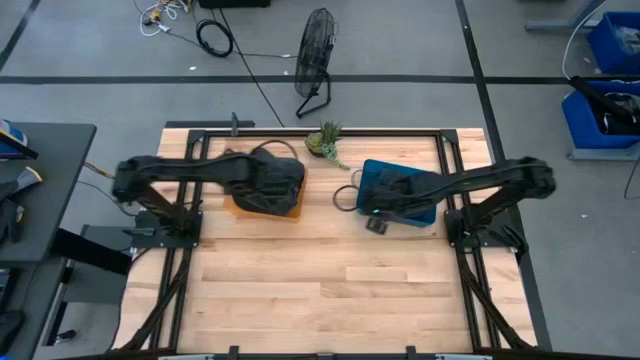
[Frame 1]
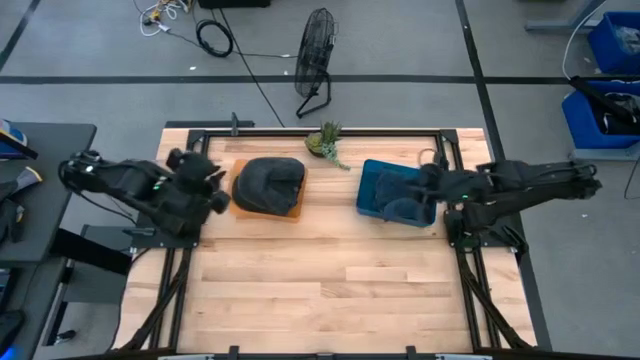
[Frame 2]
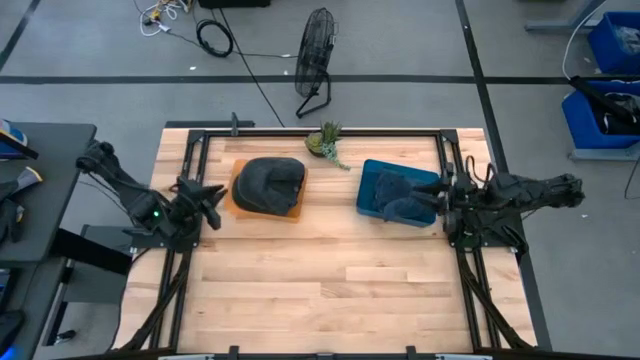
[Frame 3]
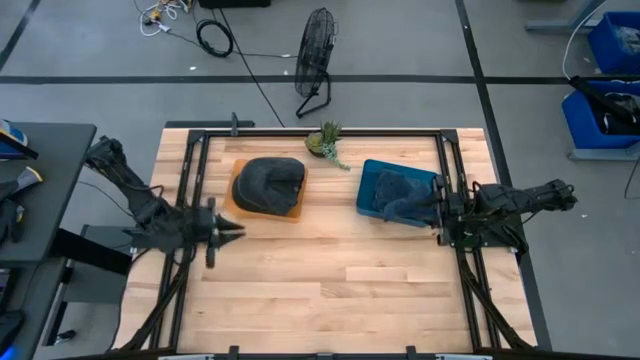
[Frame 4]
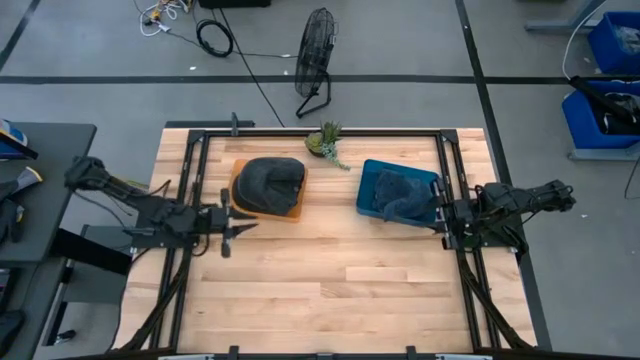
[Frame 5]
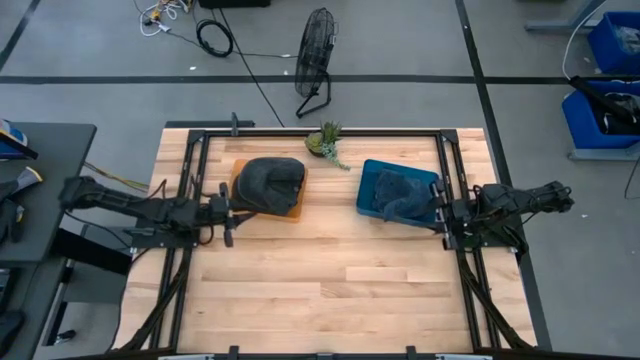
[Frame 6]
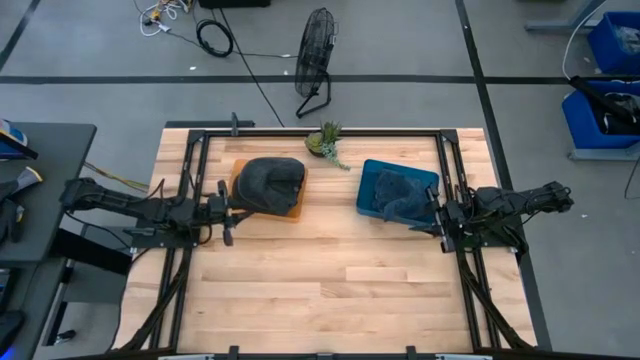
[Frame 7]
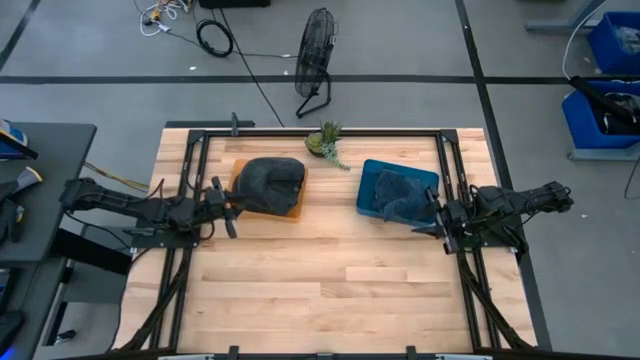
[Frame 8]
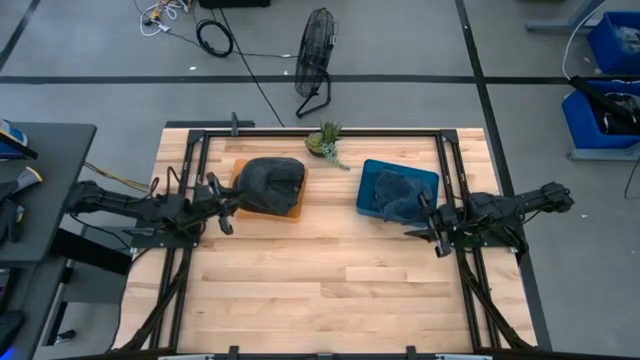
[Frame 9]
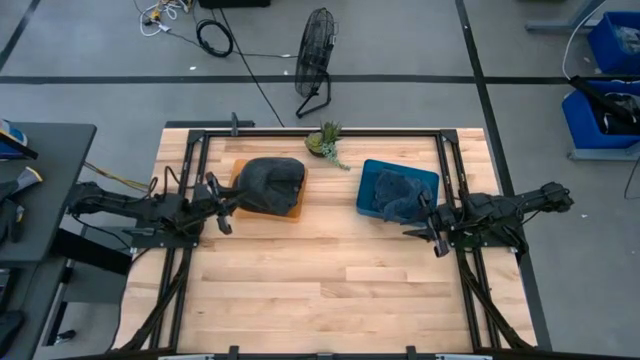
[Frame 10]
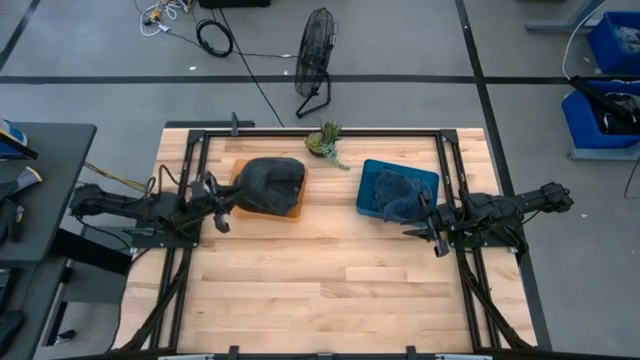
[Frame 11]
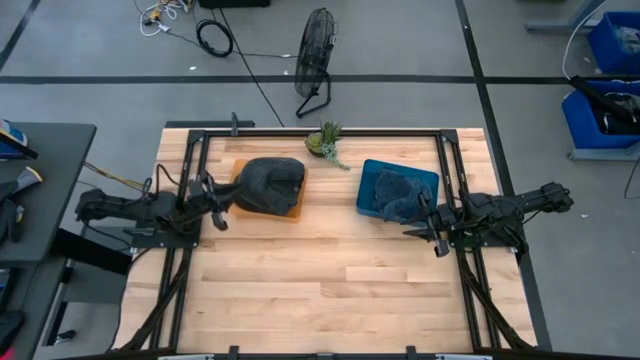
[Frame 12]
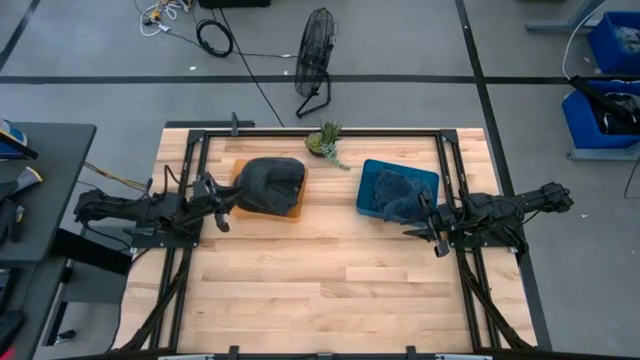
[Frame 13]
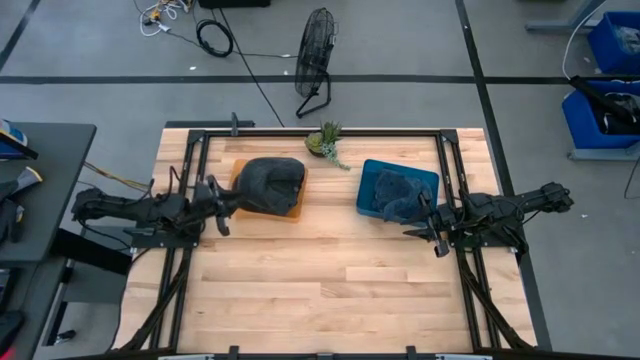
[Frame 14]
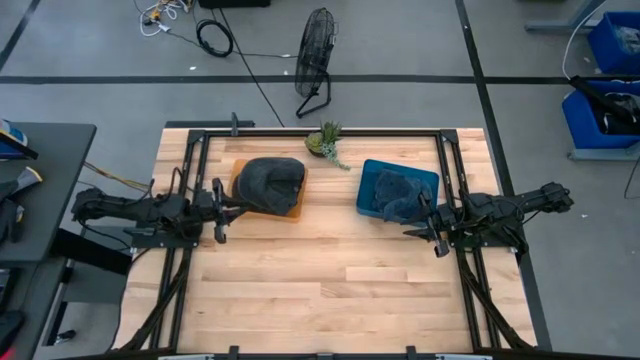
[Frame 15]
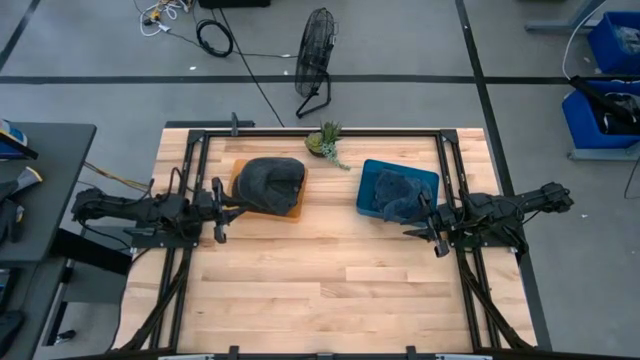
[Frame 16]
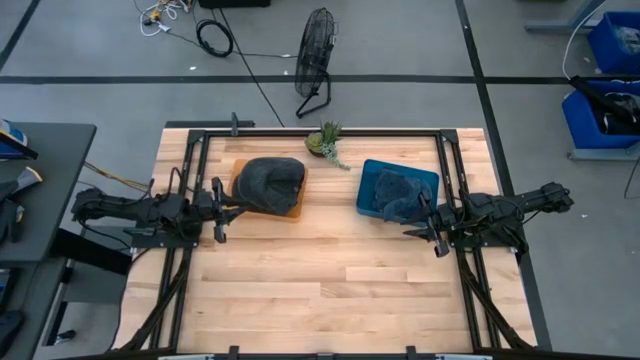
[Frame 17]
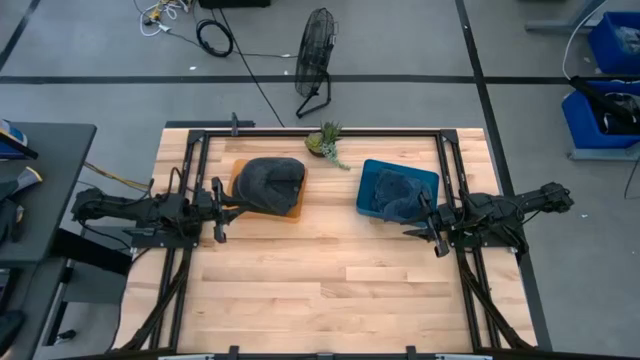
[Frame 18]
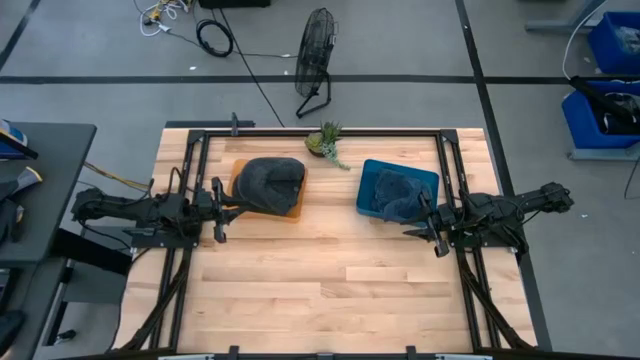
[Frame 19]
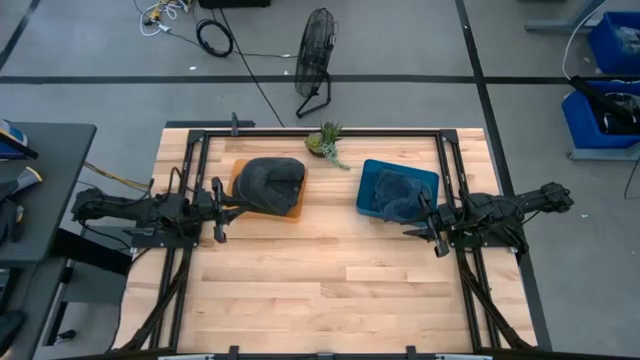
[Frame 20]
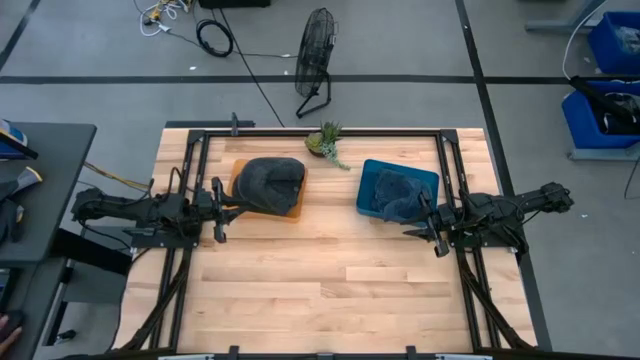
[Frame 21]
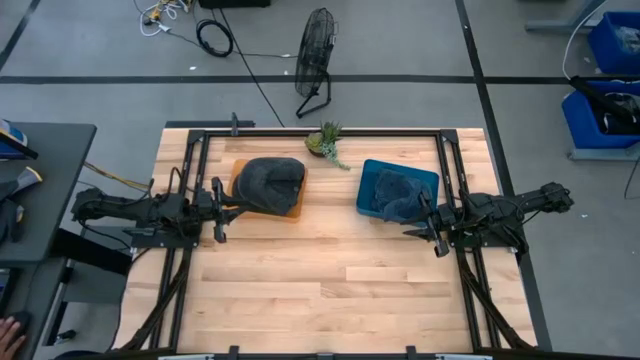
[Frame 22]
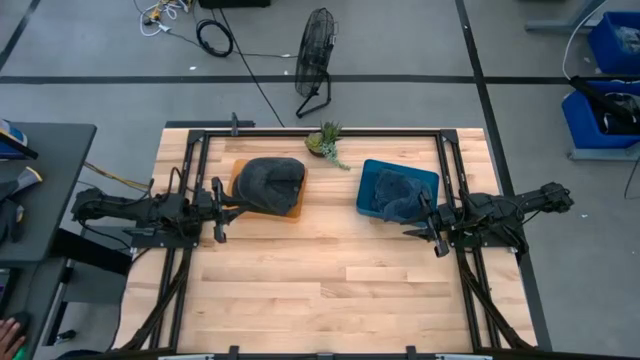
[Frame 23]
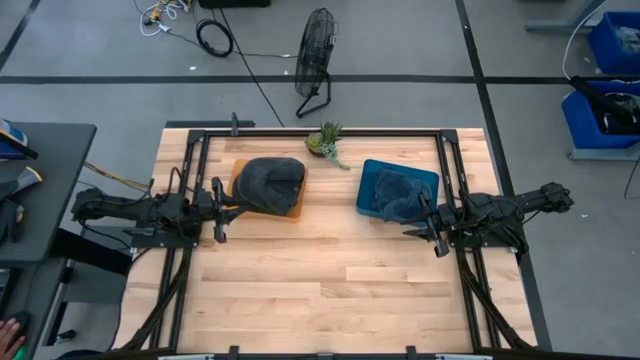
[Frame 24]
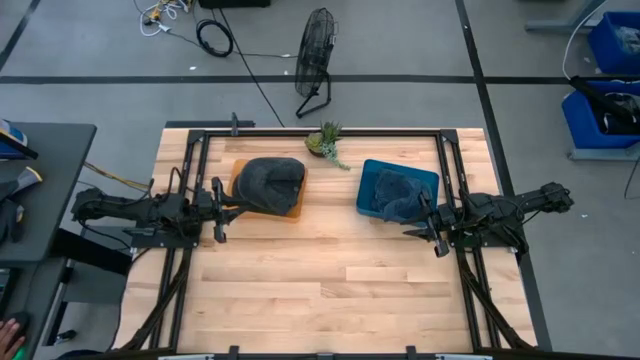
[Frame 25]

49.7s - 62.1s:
Task: Pick & Place hat
Return to Home Position

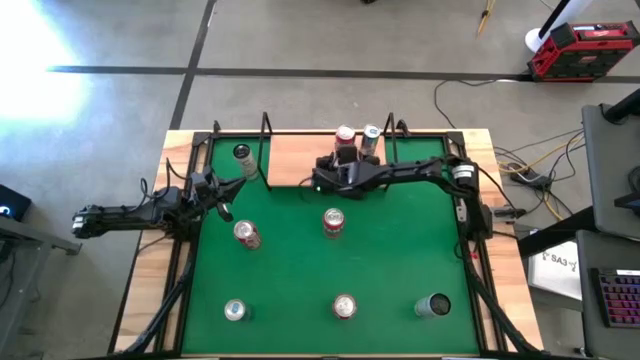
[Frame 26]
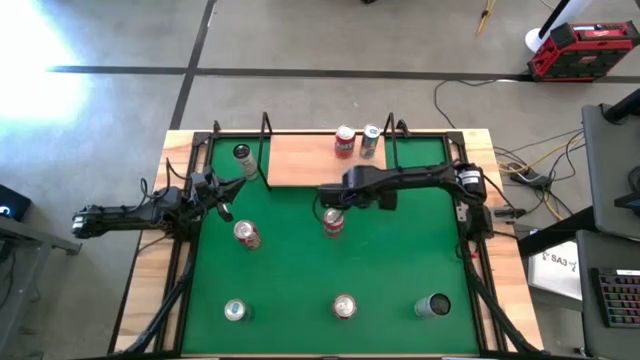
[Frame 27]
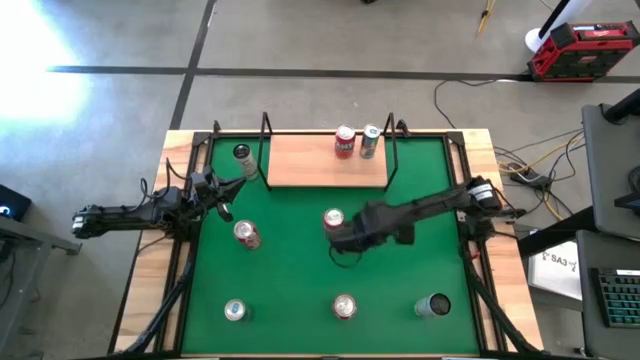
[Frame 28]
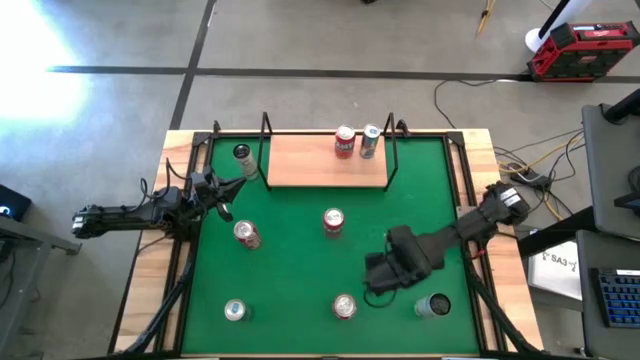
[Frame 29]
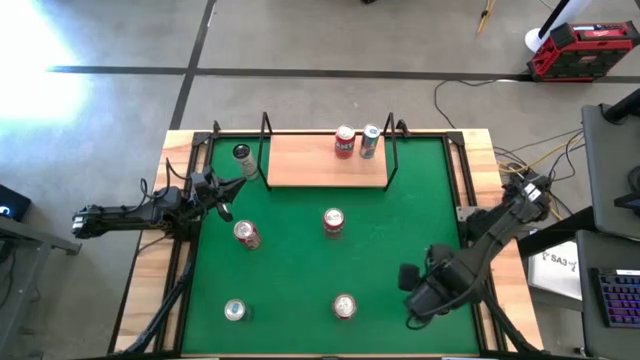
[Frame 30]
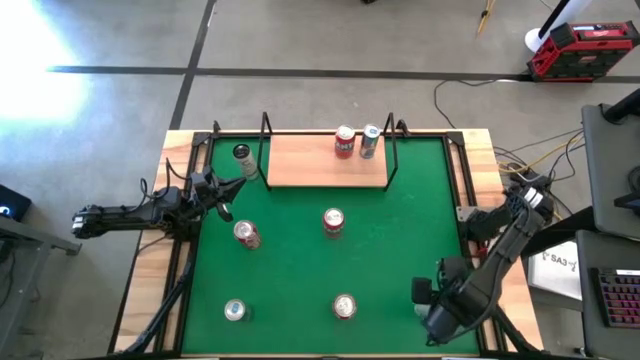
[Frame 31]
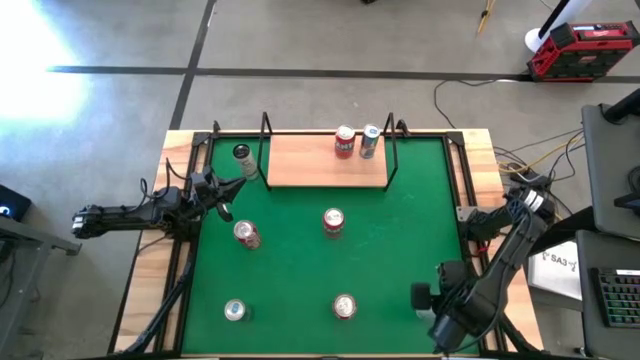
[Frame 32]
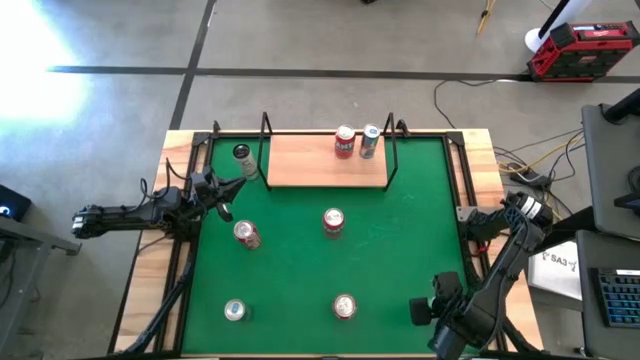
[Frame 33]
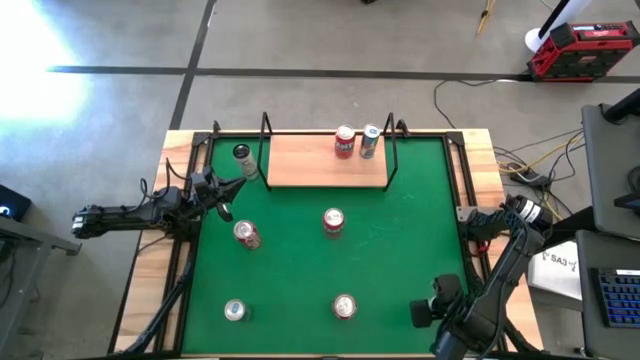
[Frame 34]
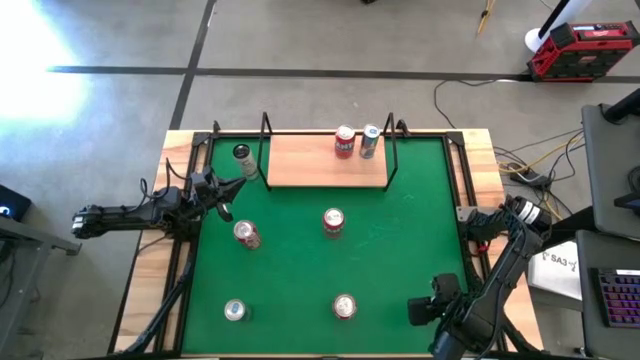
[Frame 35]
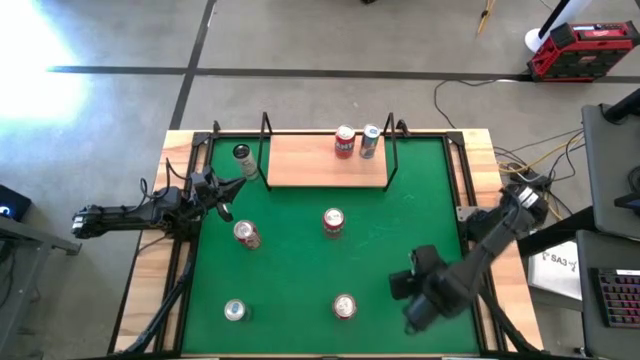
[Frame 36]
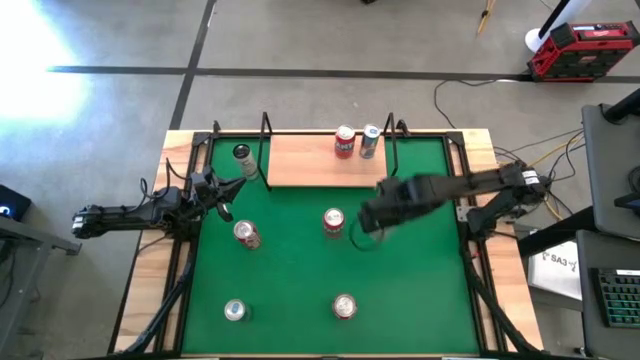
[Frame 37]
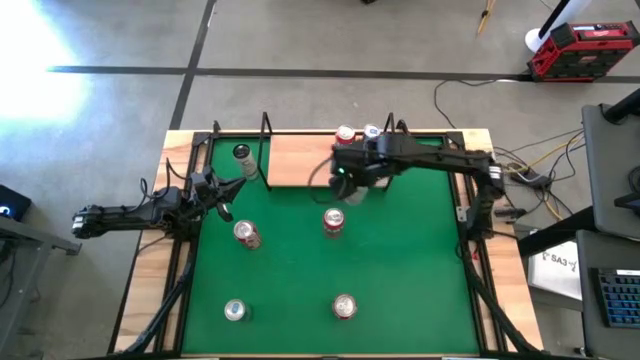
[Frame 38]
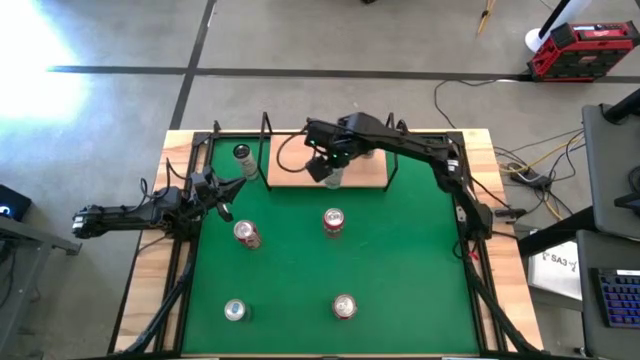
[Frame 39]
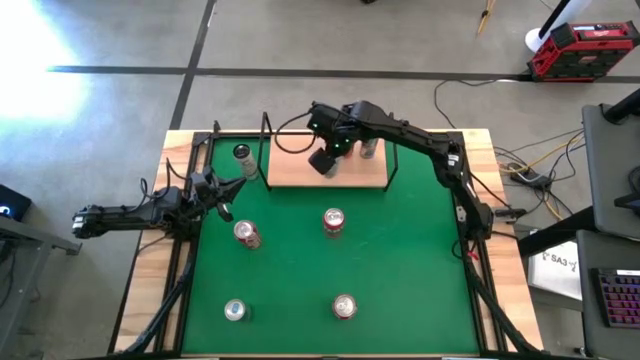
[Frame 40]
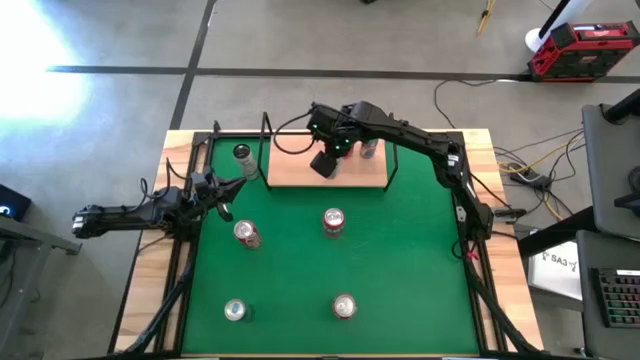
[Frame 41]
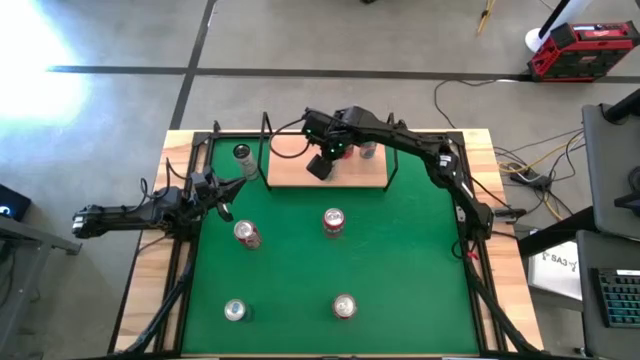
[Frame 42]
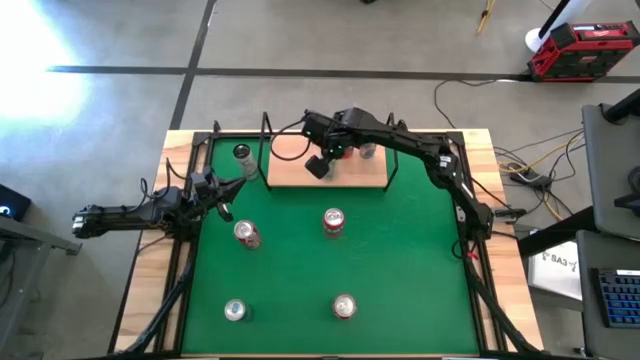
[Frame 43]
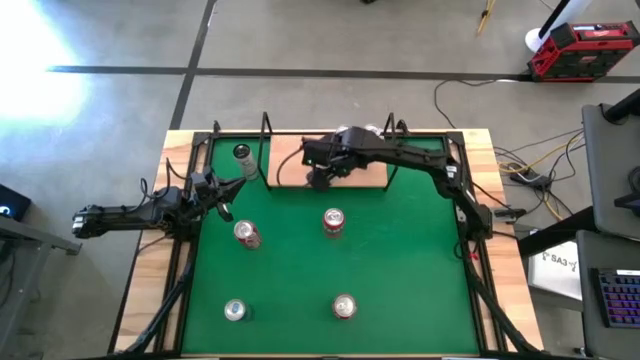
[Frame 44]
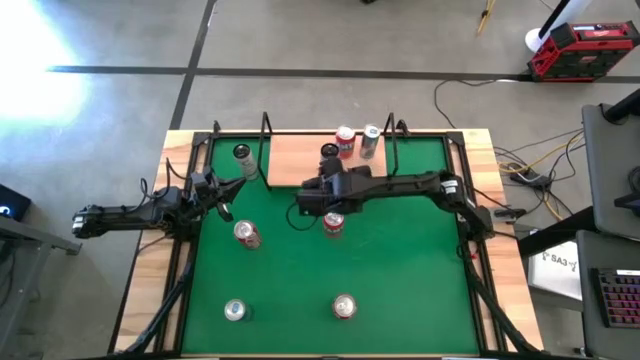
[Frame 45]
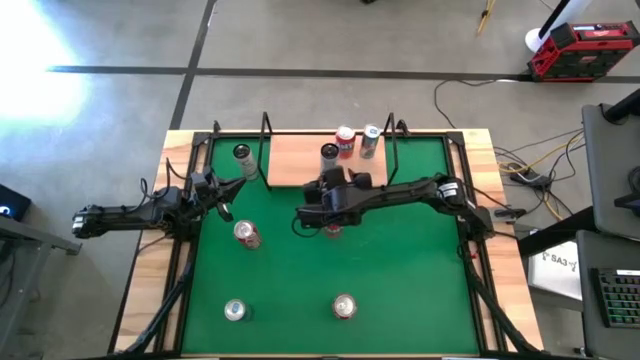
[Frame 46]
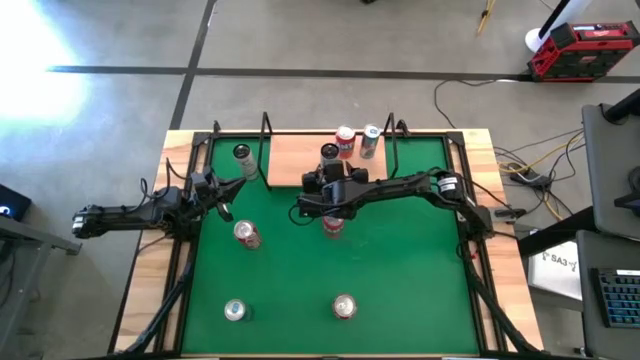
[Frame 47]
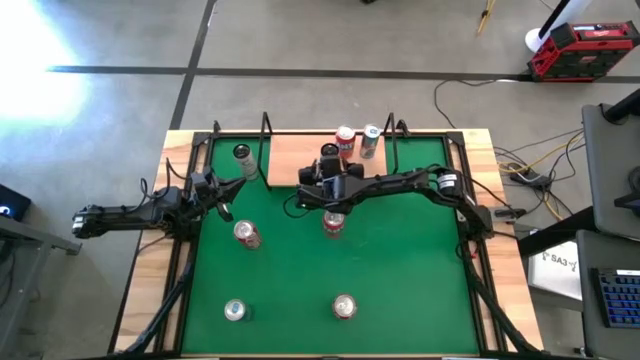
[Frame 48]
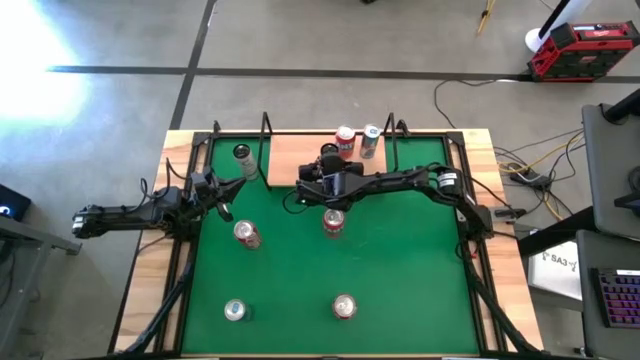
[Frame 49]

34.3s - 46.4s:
Task: Place canned beverage on shelf
Put the bottom white-yellow soda can on the shelf
